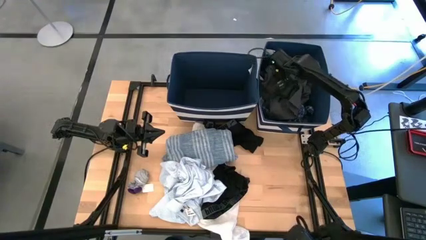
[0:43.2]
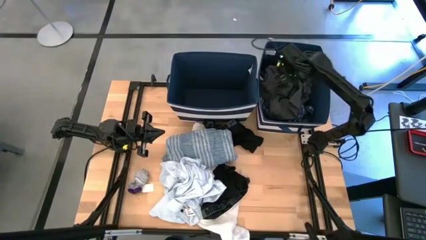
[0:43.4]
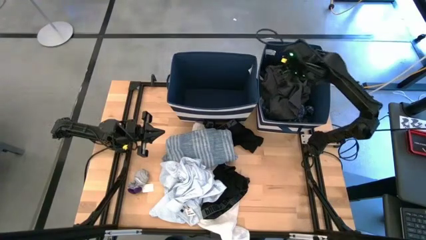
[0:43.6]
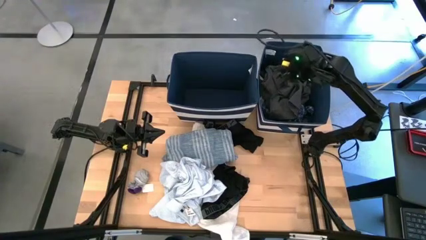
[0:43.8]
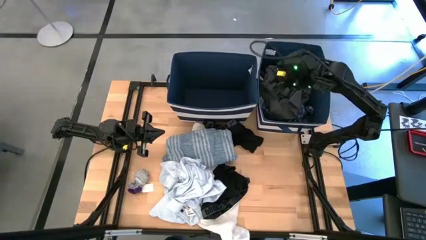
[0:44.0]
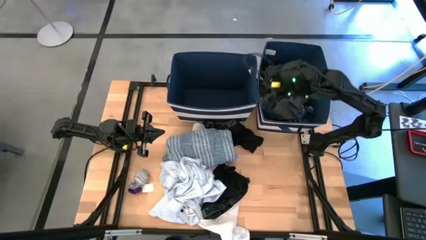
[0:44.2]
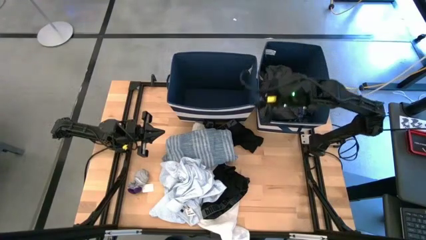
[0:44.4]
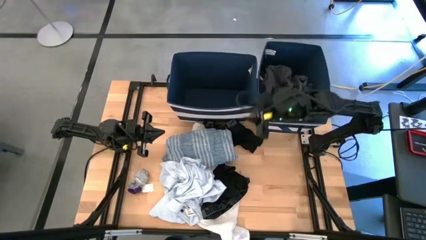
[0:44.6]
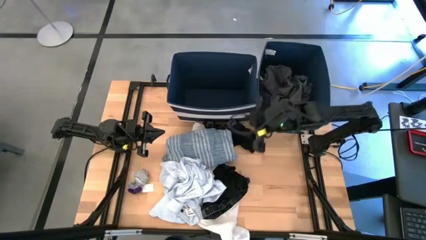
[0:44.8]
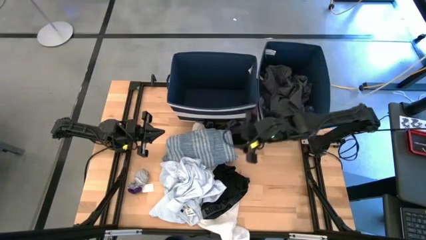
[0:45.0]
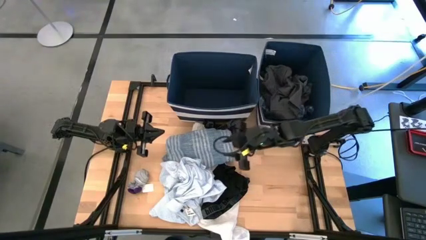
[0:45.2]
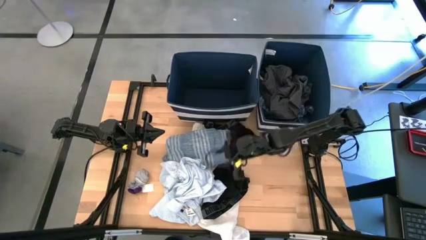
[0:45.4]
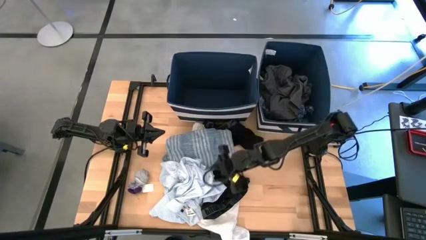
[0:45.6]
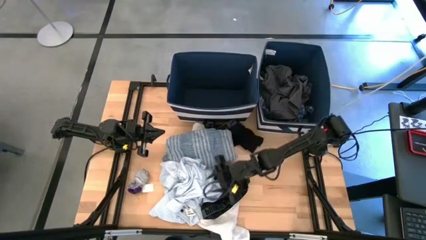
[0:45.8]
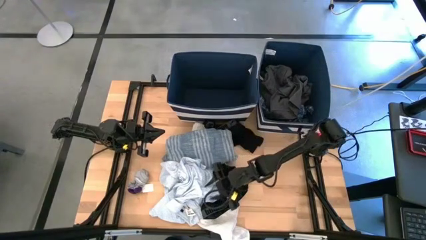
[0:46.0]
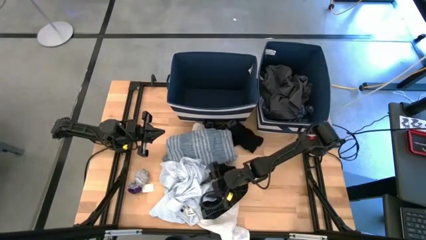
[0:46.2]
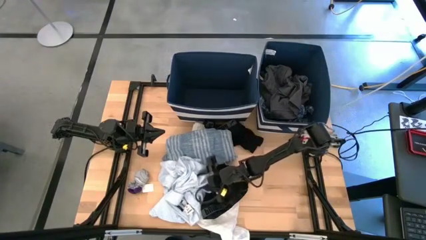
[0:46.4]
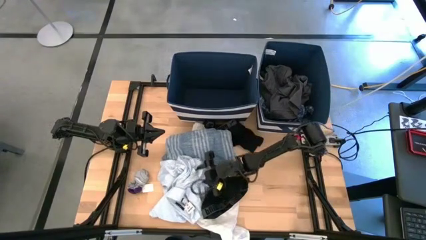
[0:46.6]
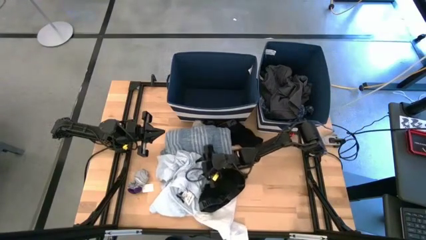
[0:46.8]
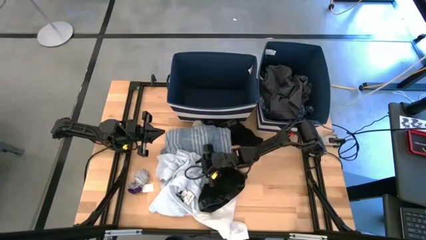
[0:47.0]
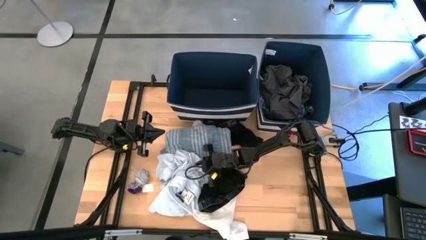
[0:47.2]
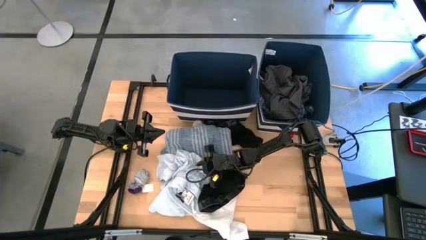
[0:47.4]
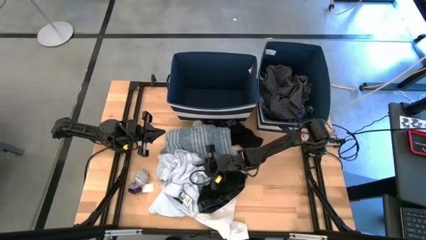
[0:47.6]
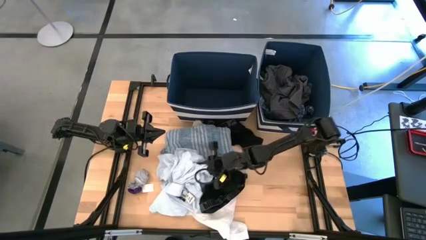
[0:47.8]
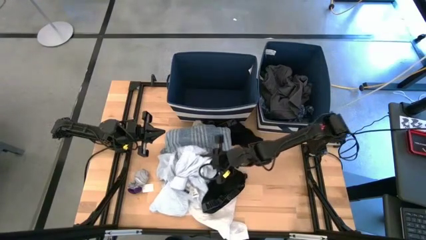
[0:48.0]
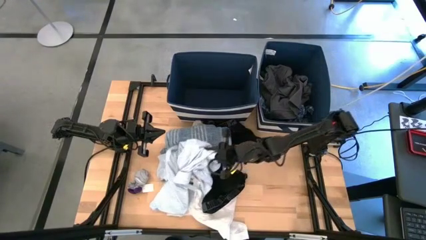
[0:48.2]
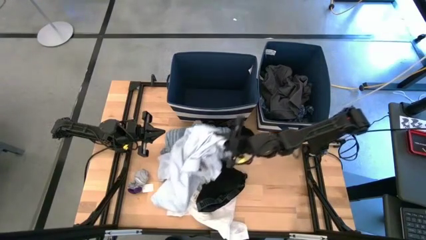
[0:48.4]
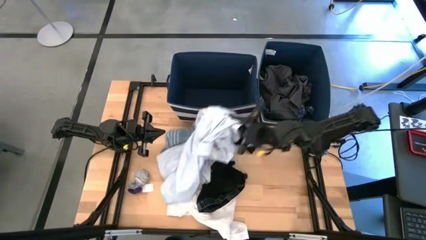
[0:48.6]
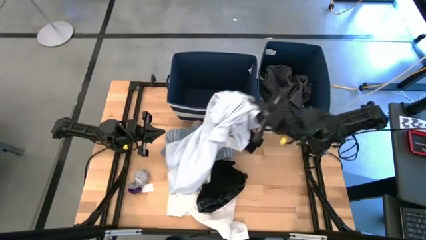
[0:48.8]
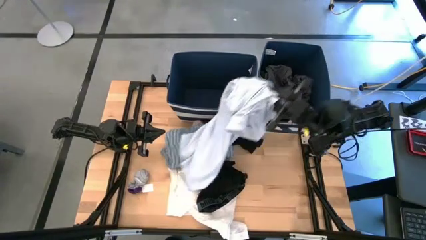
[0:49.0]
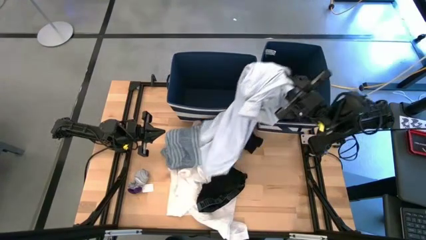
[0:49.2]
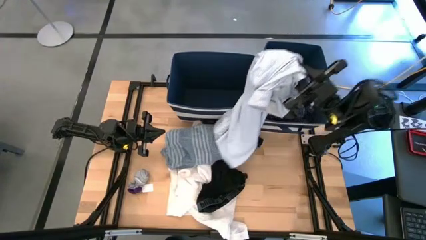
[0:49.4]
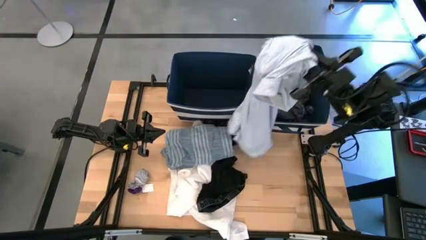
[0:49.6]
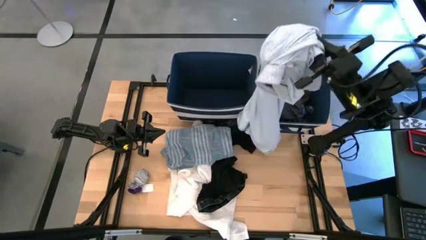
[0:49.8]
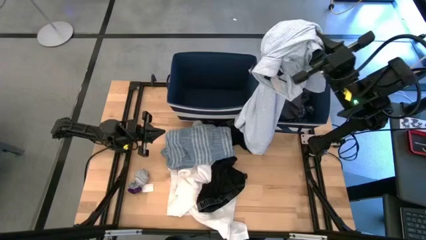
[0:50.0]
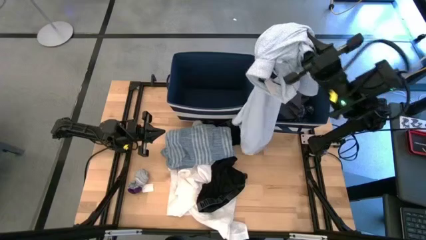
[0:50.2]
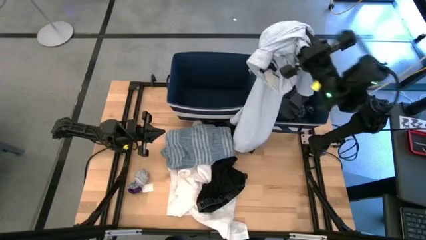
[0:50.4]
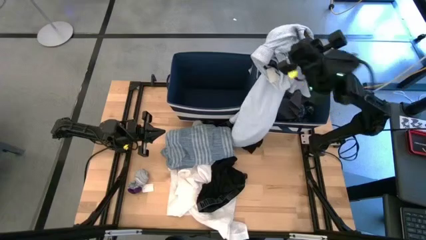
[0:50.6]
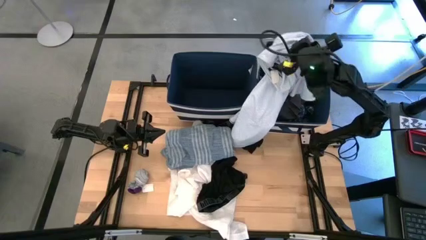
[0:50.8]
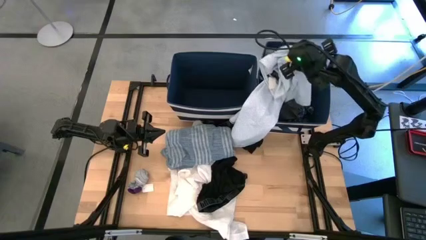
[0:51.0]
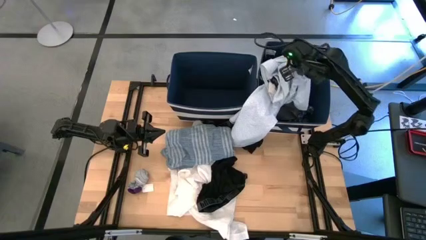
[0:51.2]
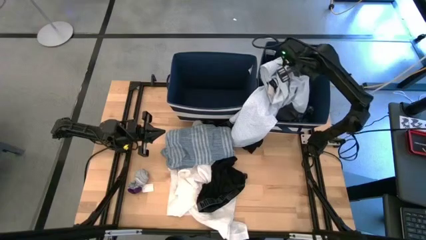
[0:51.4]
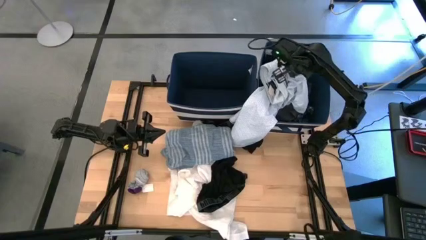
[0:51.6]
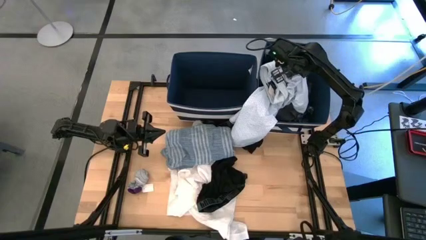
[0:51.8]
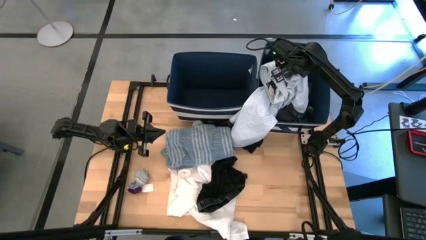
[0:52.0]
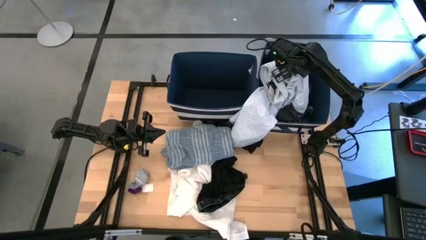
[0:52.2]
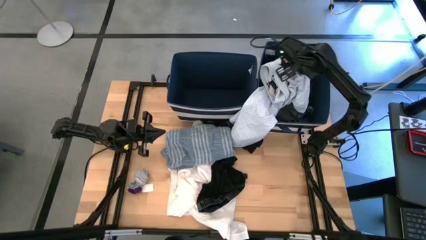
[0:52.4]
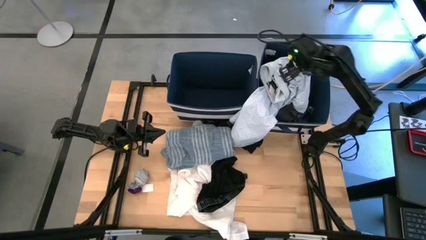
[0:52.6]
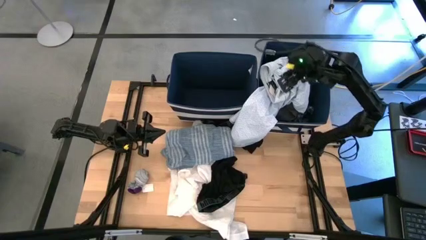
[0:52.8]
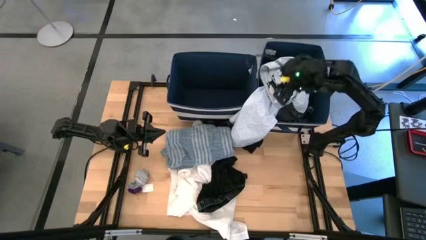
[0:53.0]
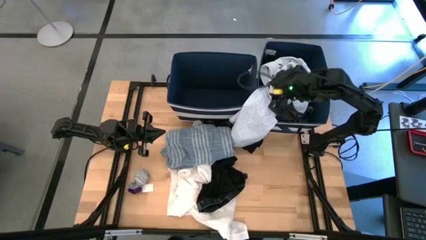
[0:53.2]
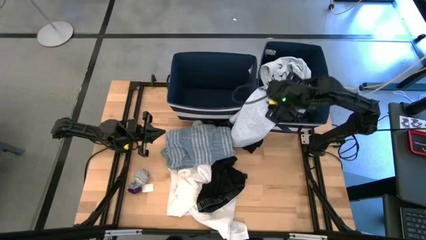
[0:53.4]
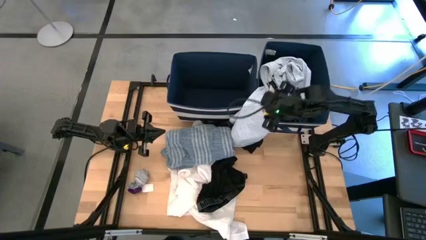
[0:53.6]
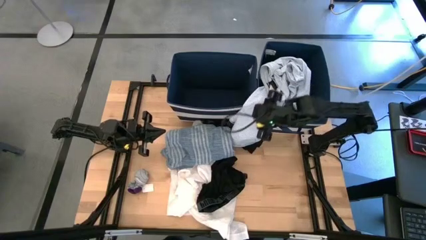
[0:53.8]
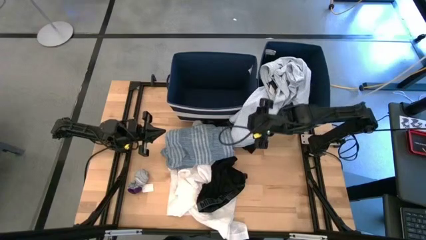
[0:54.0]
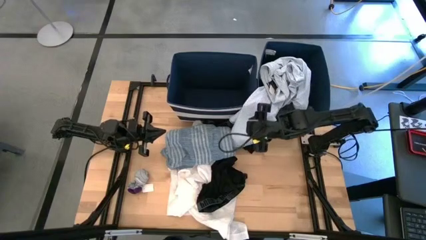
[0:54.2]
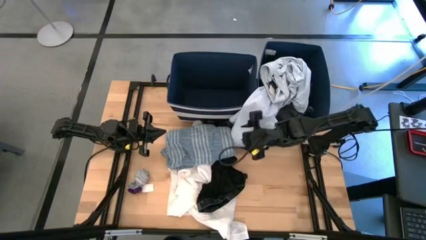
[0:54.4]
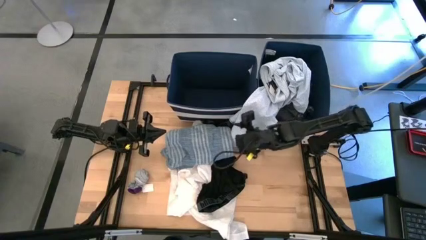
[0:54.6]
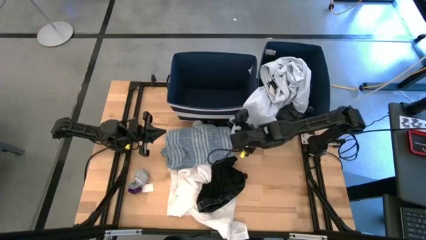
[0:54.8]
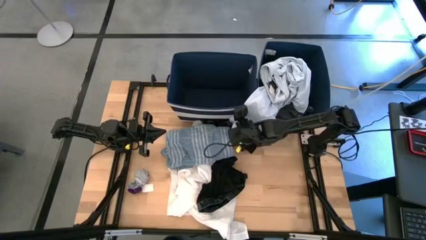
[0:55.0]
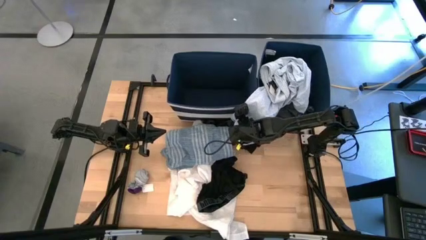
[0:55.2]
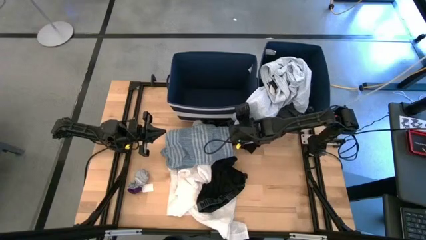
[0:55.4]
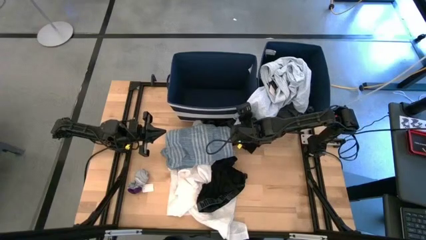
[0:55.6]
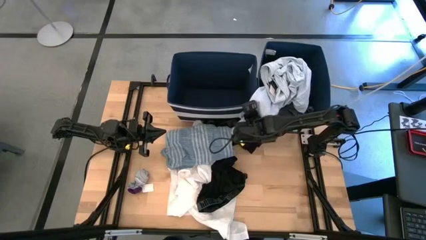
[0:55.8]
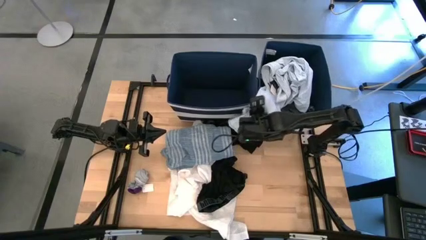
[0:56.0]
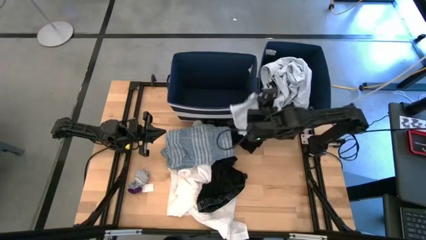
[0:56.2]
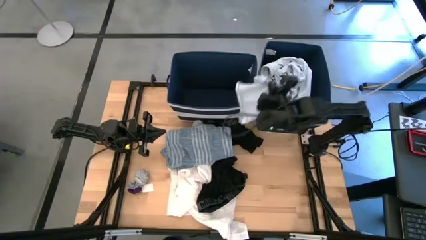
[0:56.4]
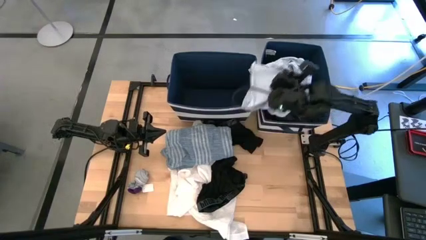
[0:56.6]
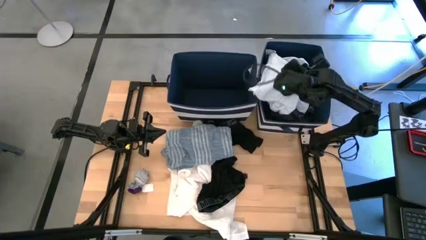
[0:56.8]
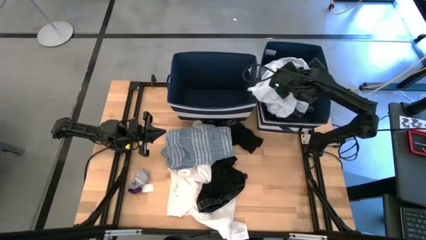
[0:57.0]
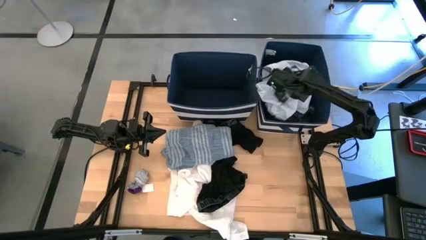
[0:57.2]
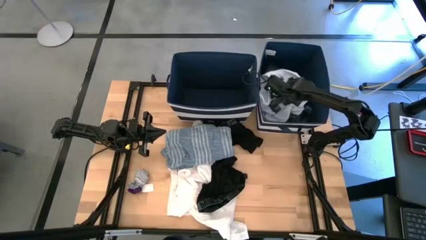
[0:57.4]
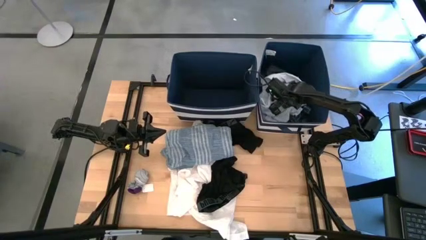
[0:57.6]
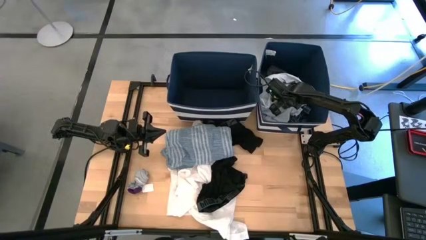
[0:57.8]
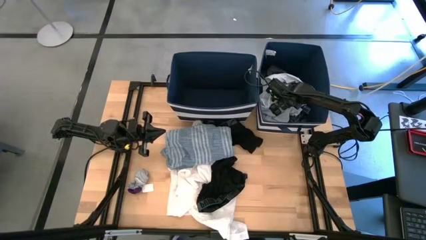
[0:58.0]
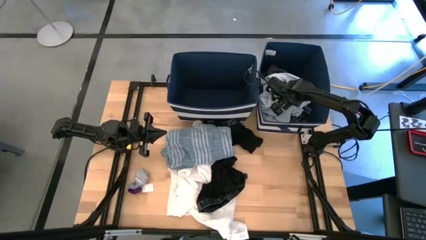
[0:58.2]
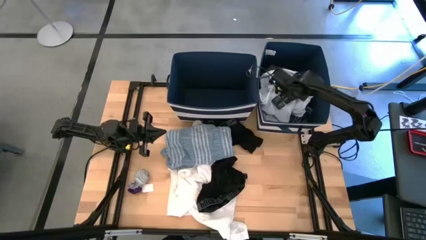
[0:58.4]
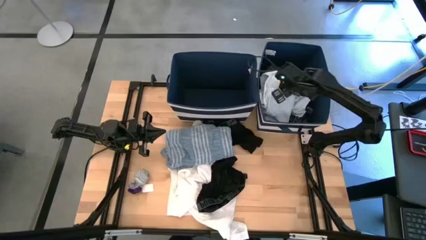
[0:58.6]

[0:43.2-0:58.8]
Task: Sort clothes
Put the light gray patterned polo into the right blue laundry organizer
